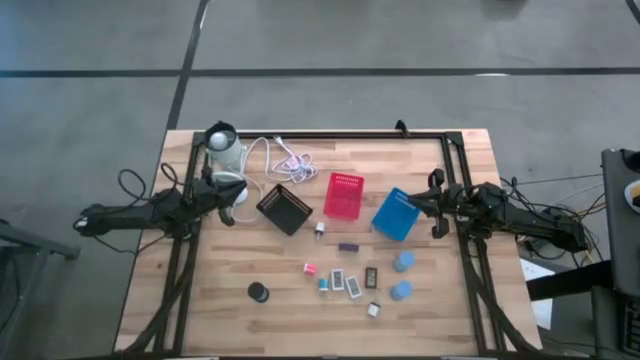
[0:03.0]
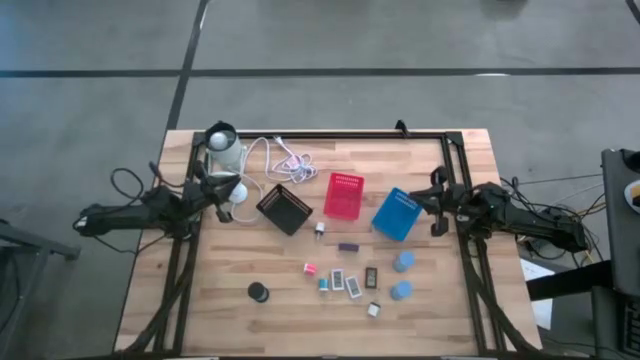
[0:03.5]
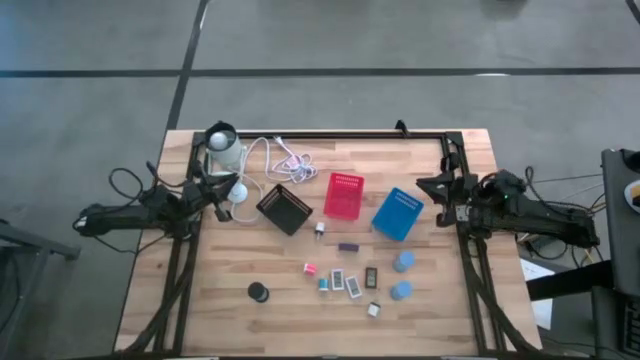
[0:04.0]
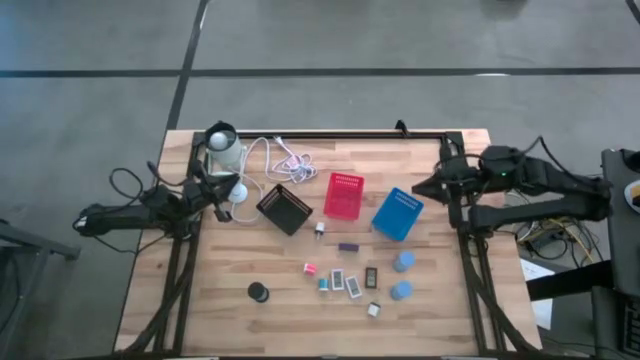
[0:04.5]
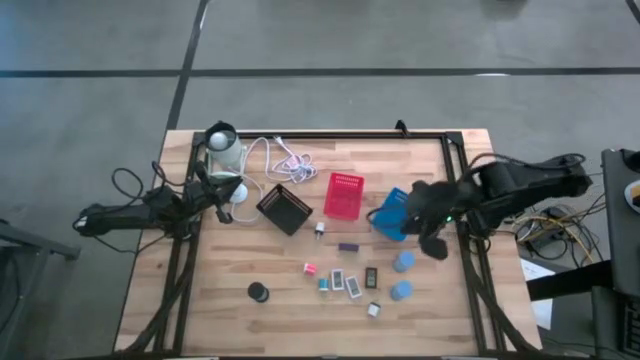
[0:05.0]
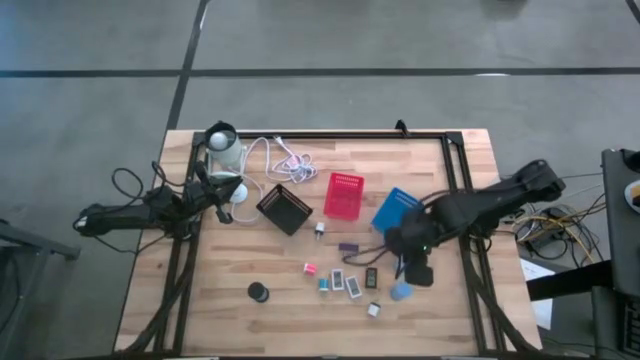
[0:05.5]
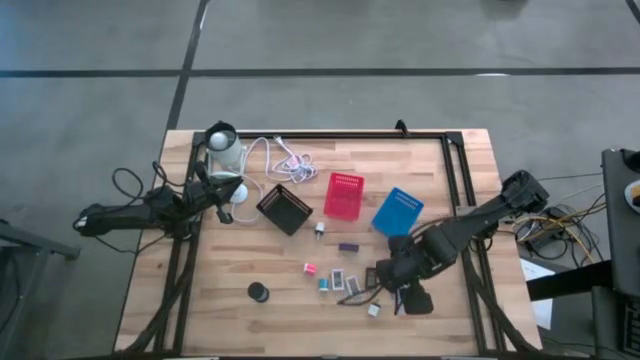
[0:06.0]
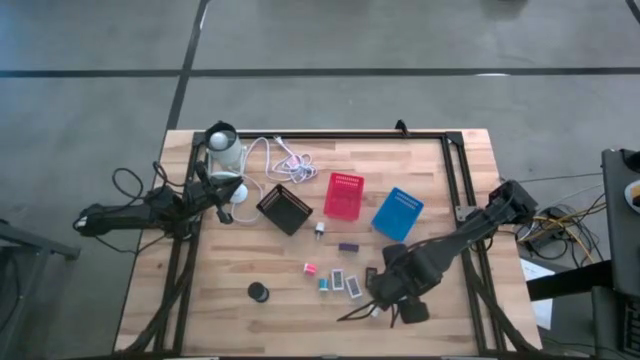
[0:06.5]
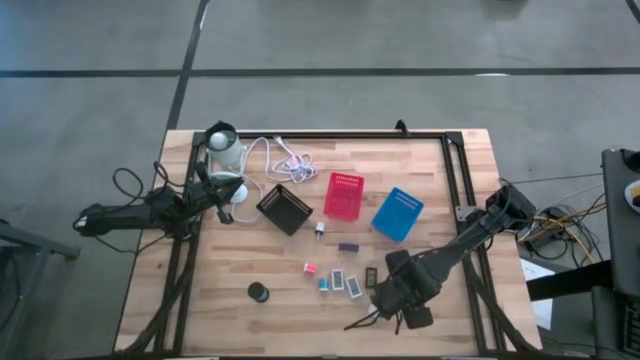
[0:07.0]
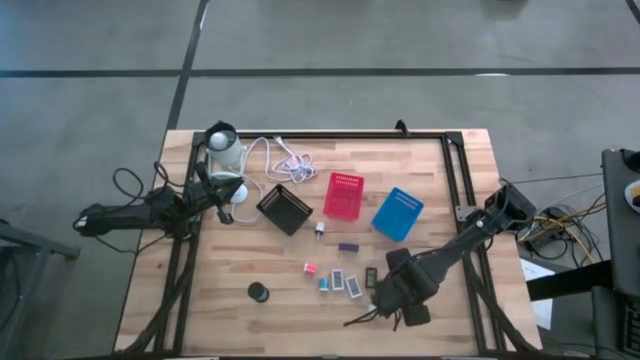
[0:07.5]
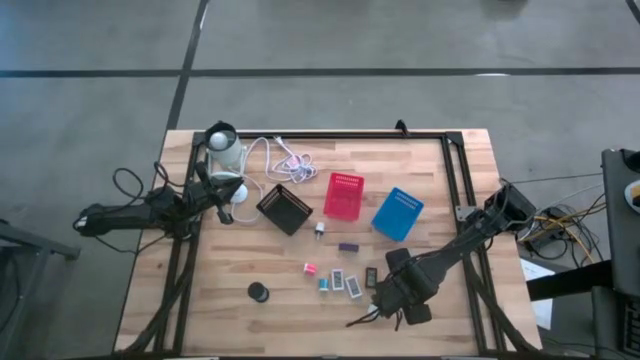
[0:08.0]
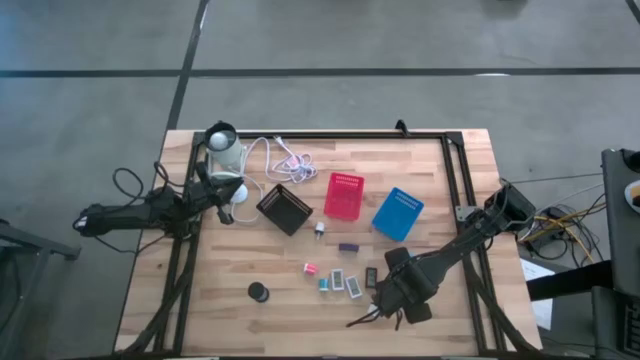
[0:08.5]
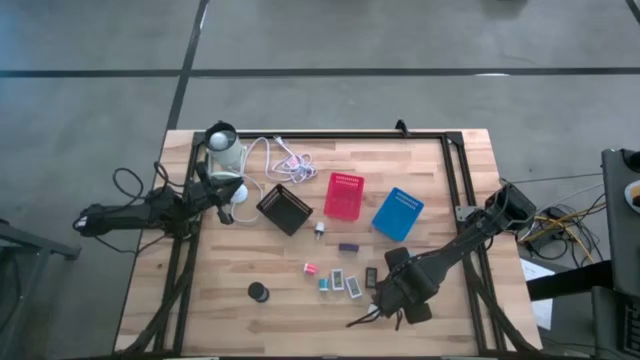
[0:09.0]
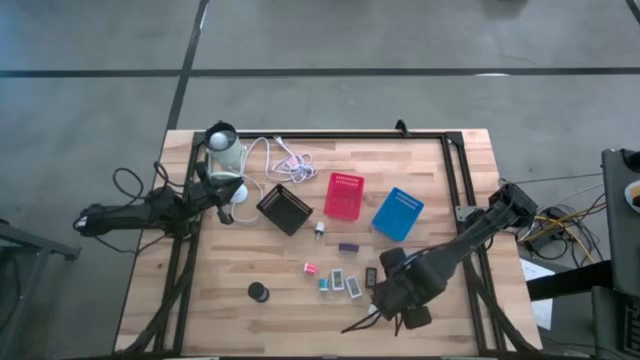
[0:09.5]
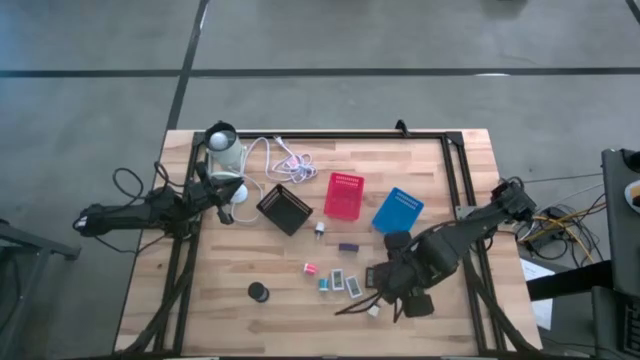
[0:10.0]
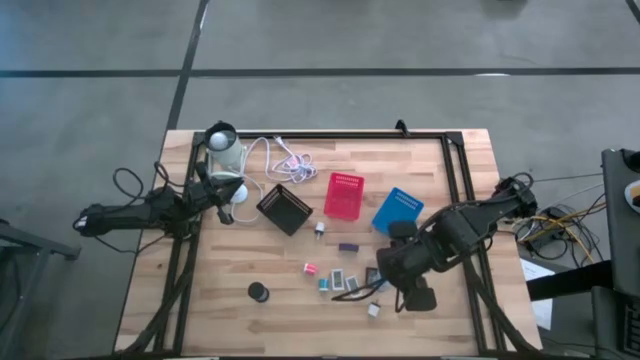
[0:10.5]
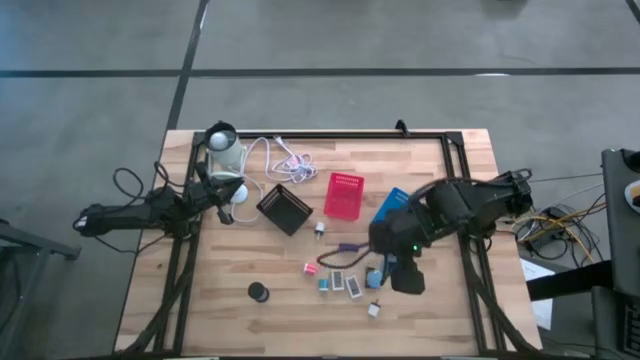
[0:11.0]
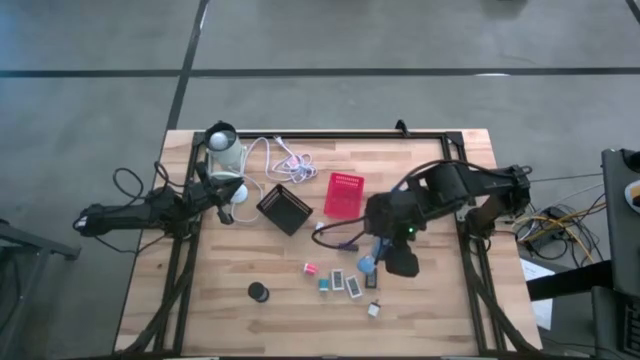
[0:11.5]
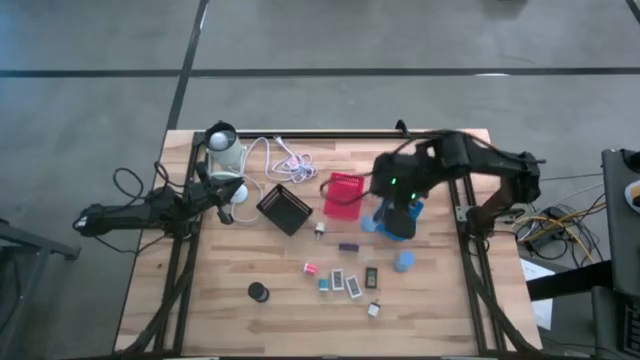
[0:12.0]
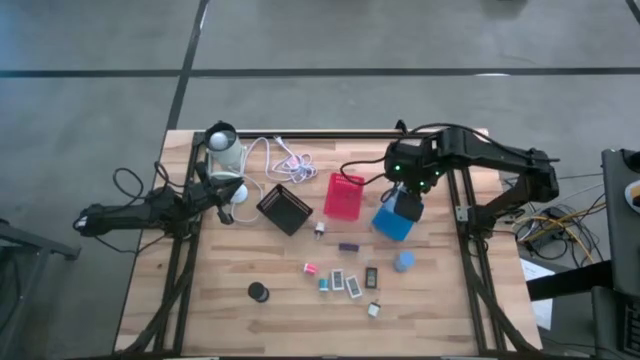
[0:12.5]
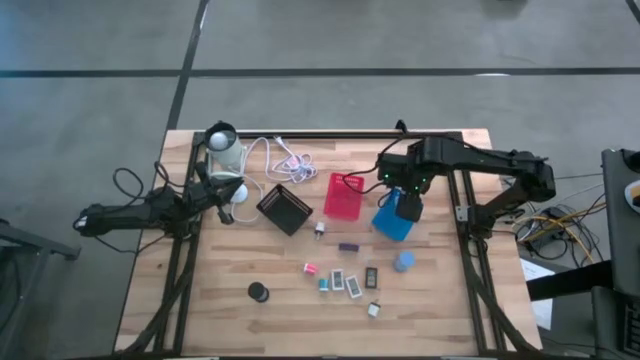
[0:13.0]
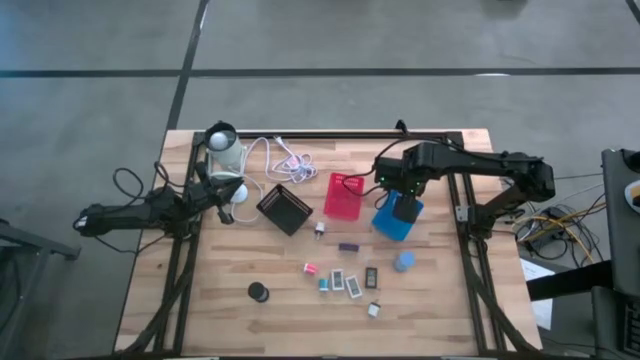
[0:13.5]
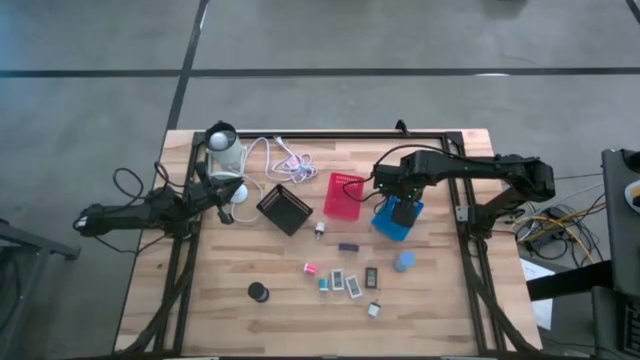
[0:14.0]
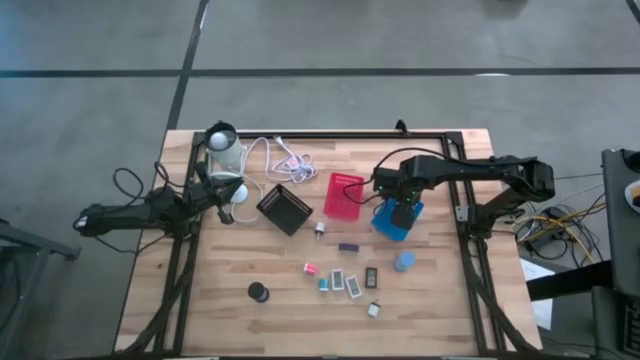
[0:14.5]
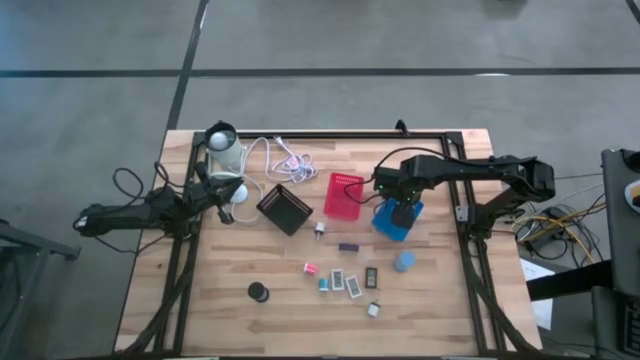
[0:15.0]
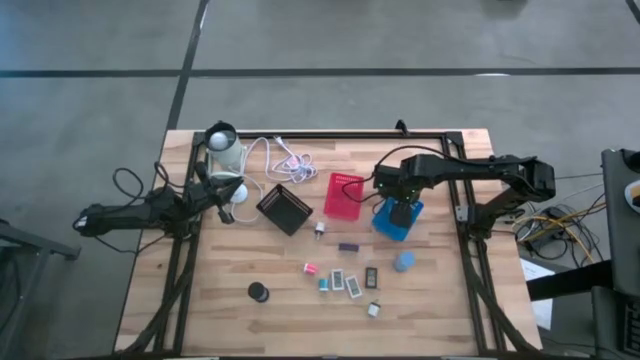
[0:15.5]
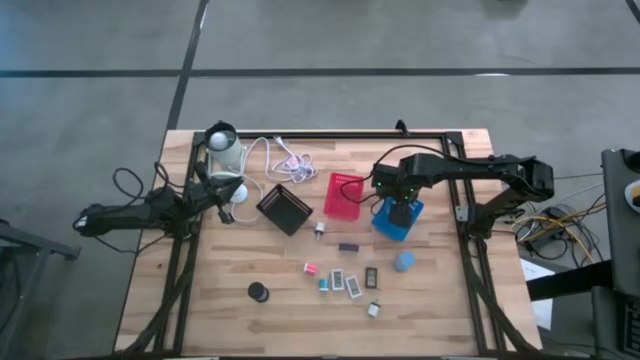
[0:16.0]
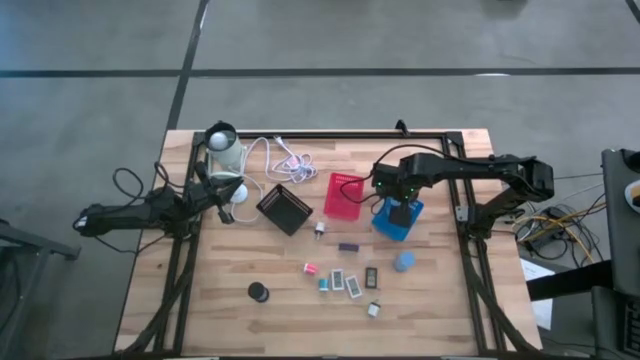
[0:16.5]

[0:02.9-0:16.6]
Task: Pick & Place Office items
Put the blue hourglass into the blue basket

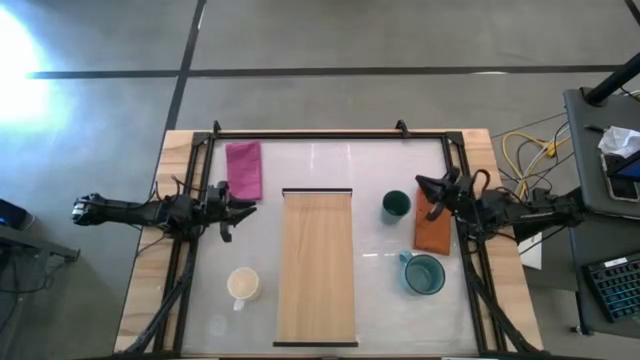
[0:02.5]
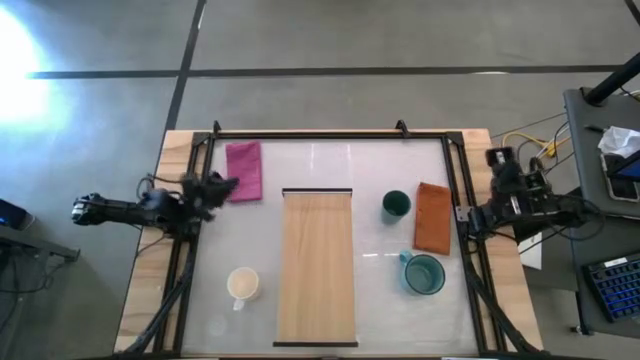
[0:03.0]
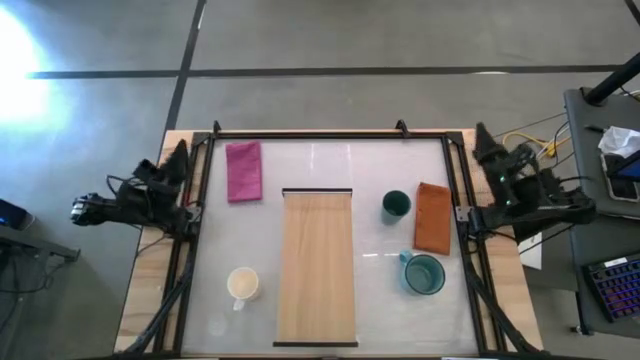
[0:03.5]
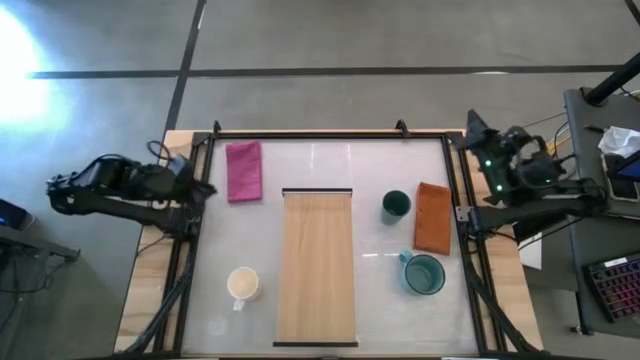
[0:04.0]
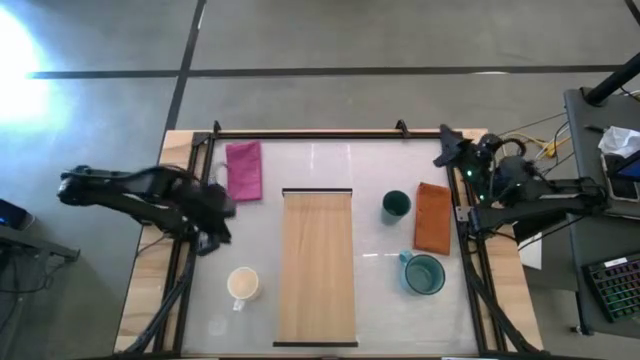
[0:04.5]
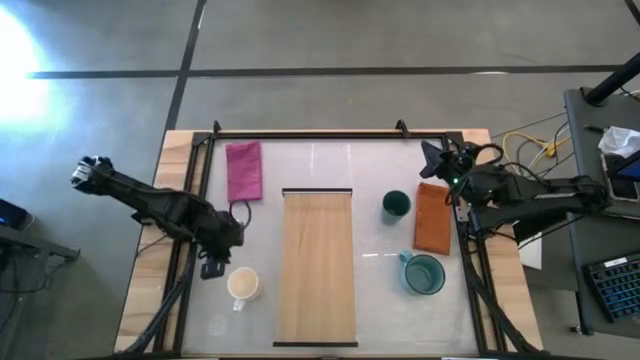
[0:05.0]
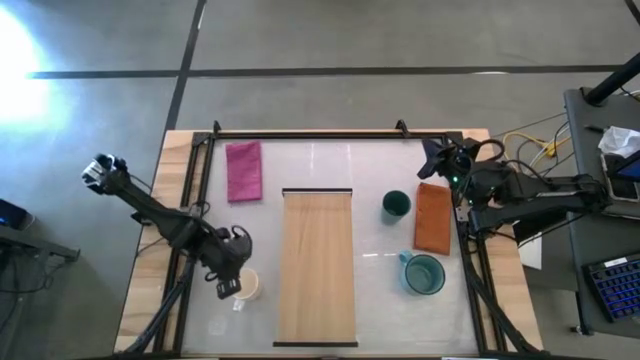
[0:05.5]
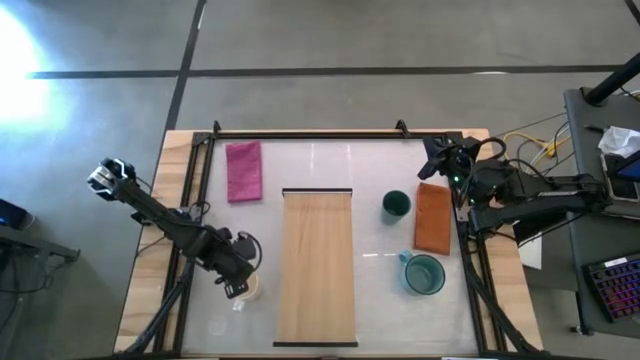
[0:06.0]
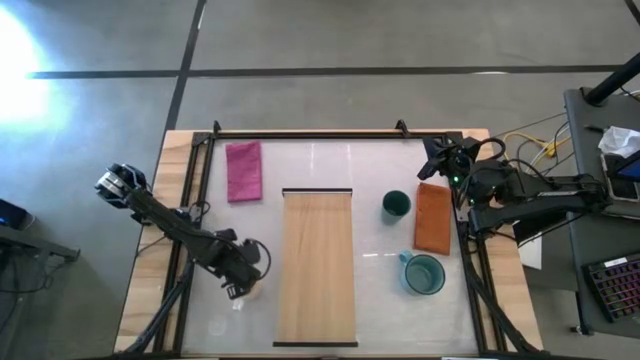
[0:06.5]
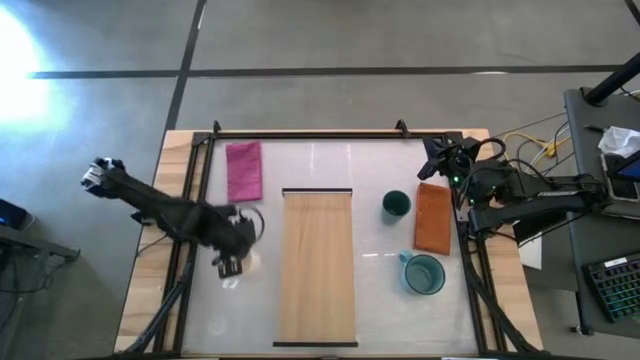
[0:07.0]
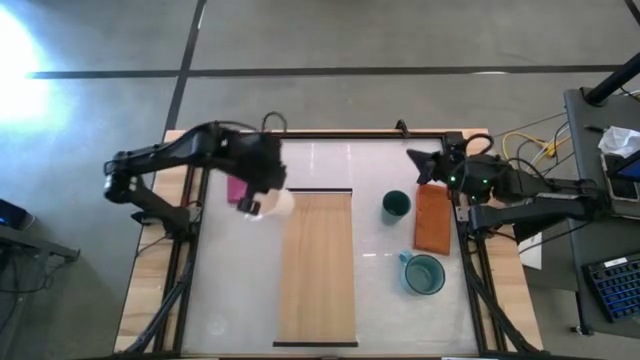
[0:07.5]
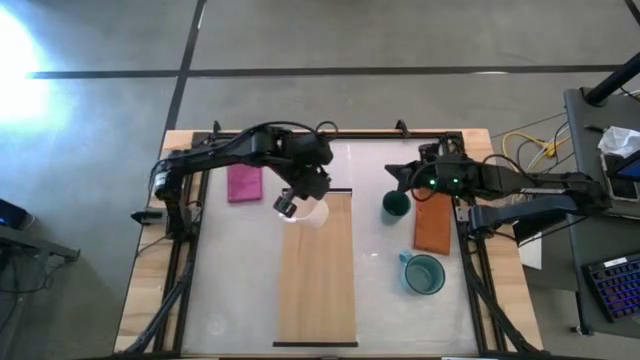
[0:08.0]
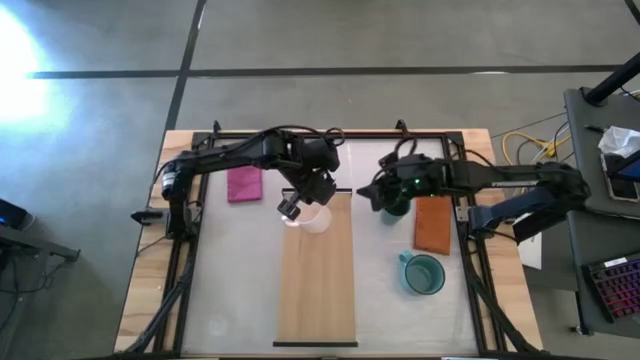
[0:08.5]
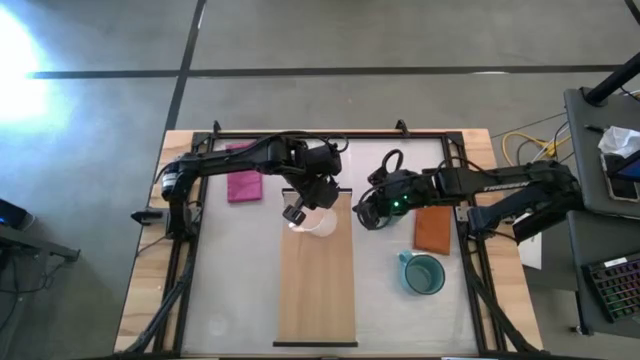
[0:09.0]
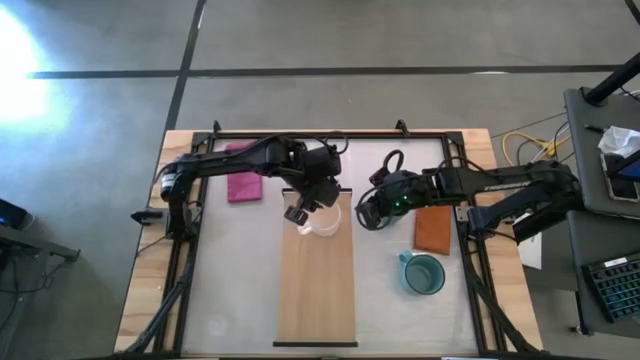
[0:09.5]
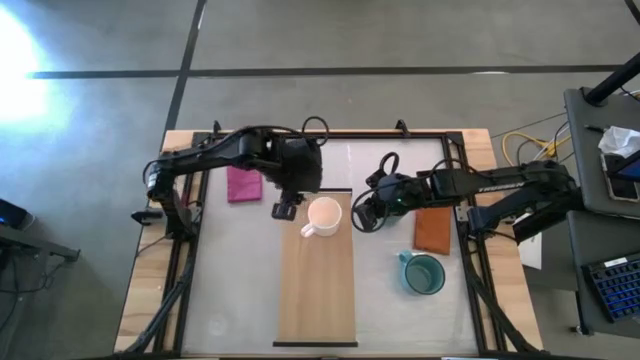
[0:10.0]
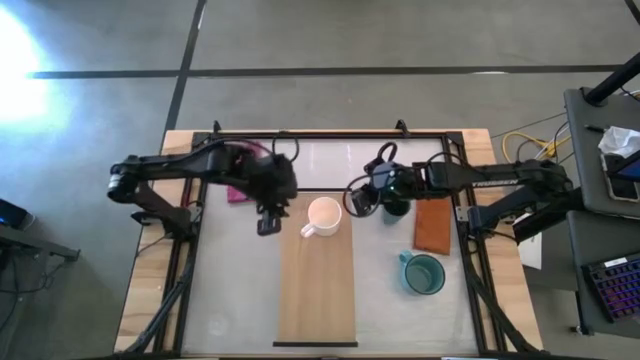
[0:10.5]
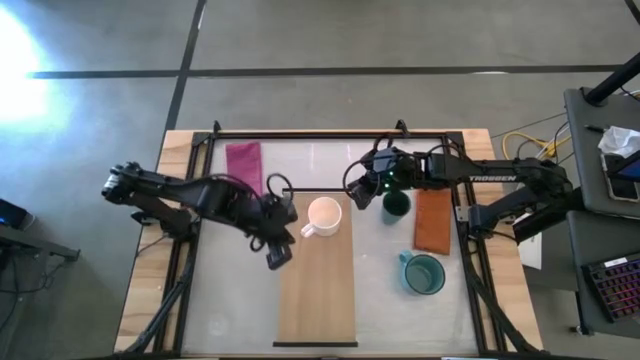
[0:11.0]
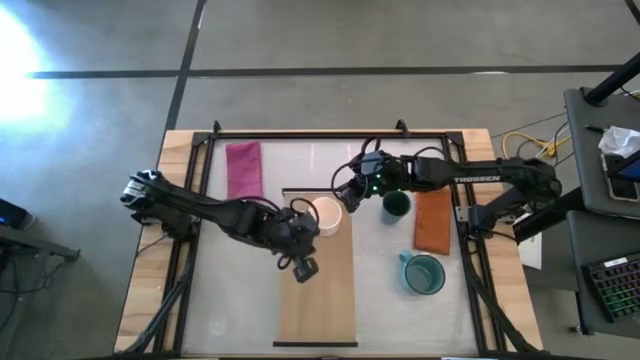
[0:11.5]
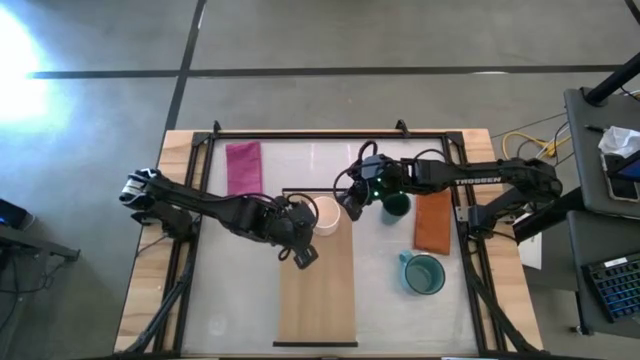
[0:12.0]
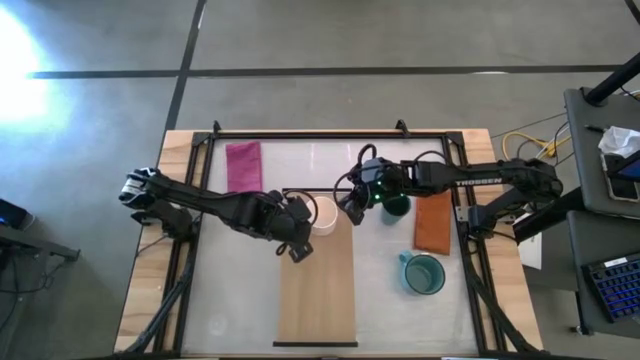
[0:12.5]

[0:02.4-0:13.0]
Task: Stack small to large cups/mugs on shelf
Put the white mug on the shelf
